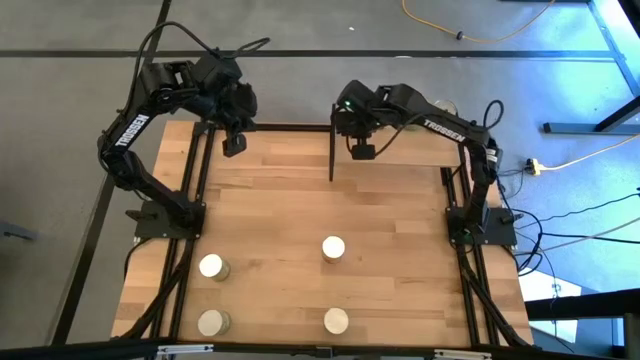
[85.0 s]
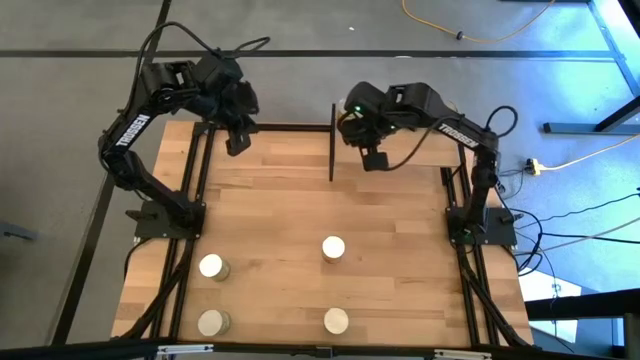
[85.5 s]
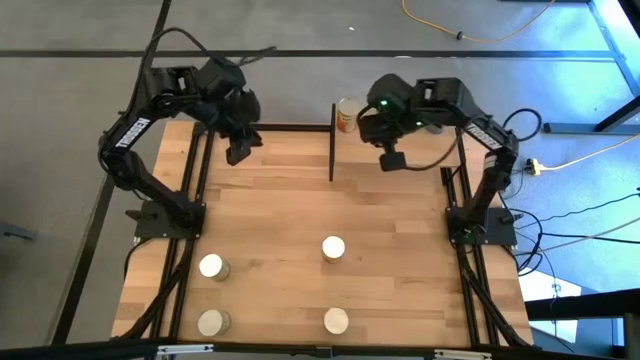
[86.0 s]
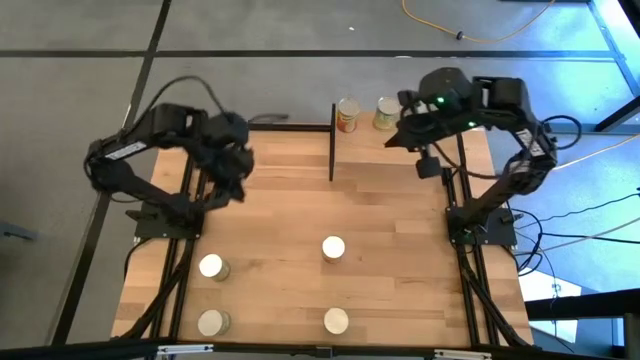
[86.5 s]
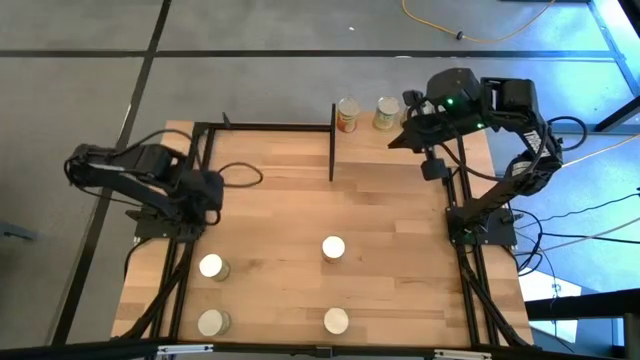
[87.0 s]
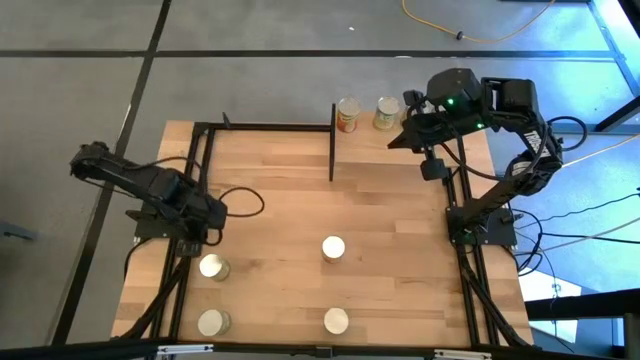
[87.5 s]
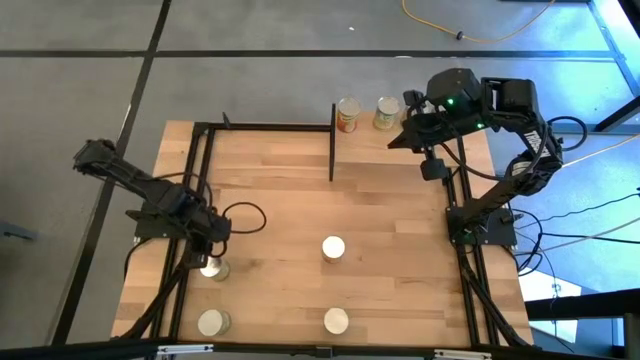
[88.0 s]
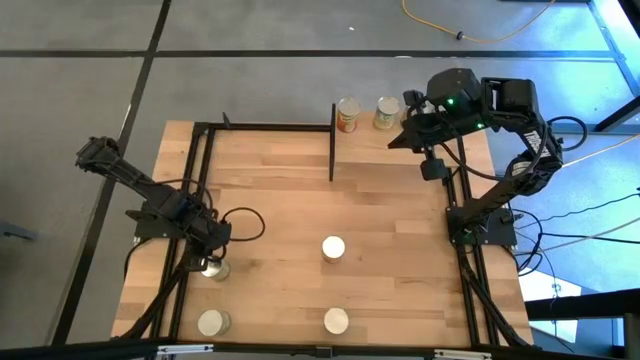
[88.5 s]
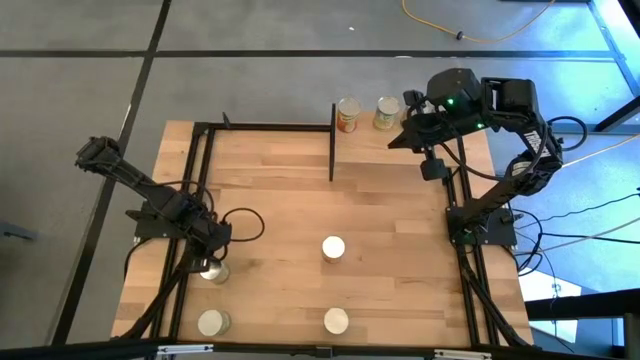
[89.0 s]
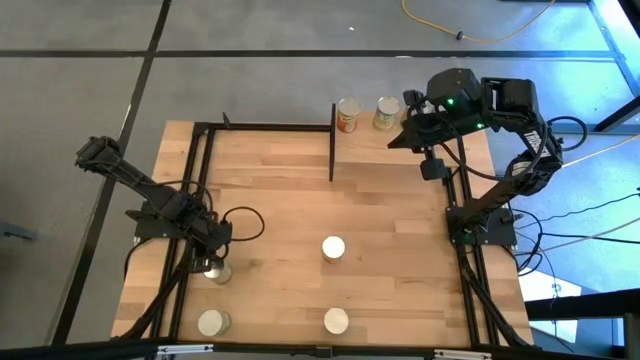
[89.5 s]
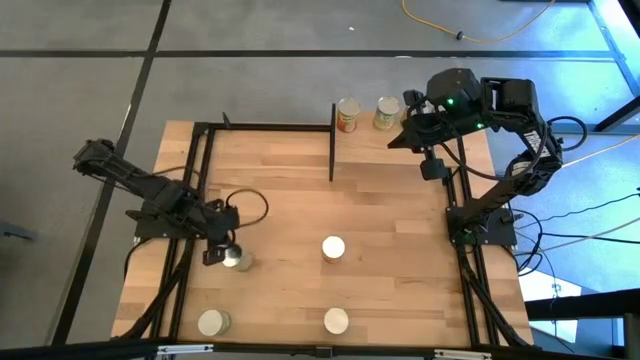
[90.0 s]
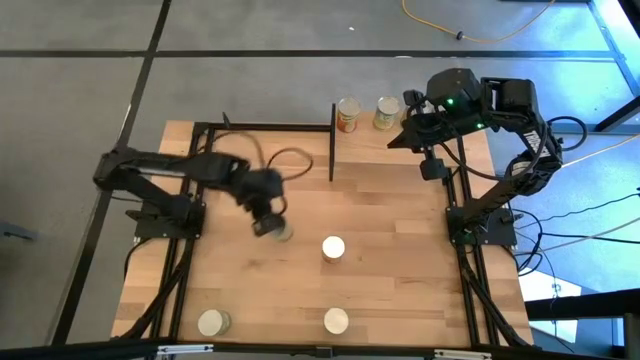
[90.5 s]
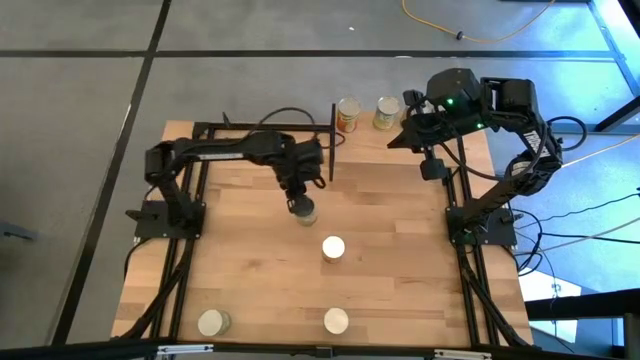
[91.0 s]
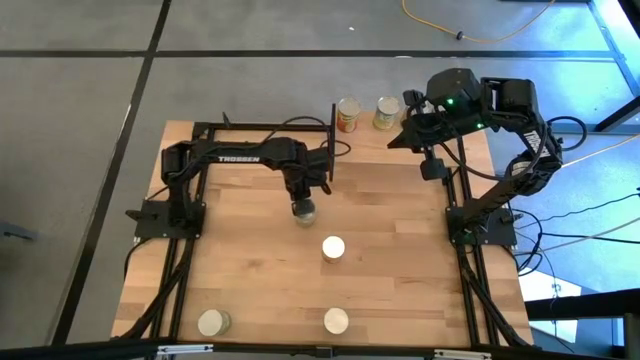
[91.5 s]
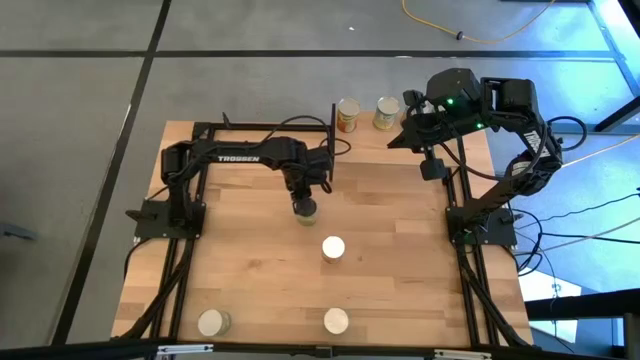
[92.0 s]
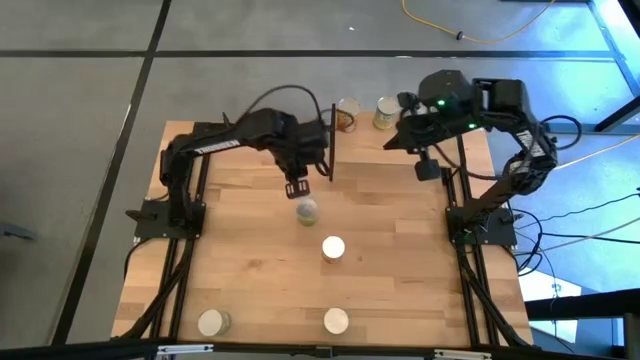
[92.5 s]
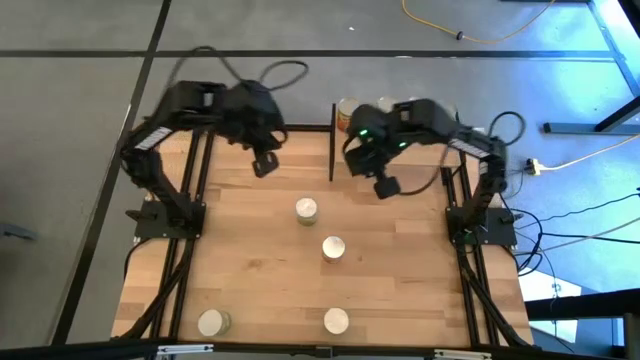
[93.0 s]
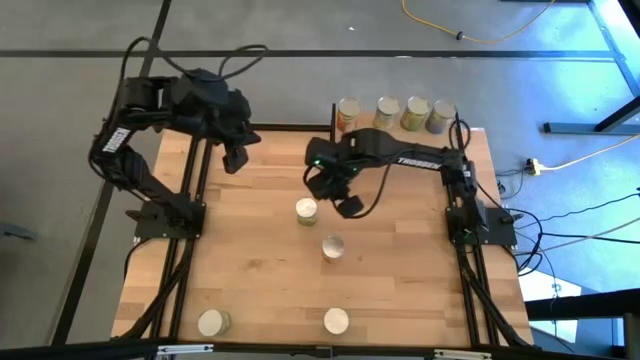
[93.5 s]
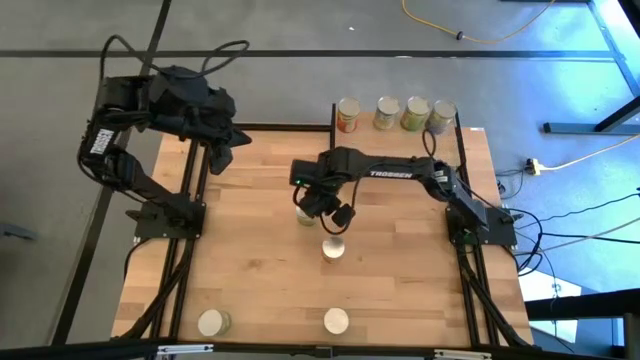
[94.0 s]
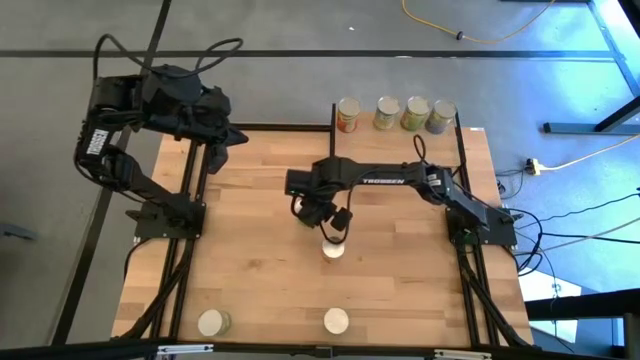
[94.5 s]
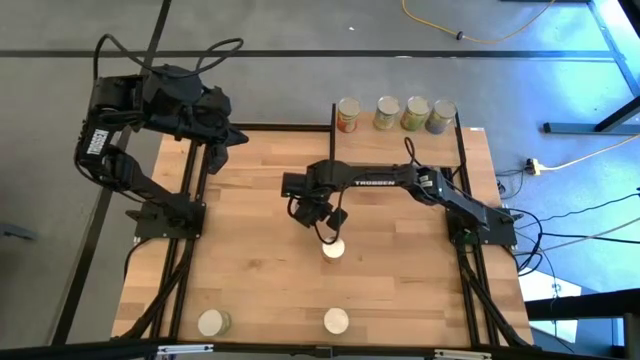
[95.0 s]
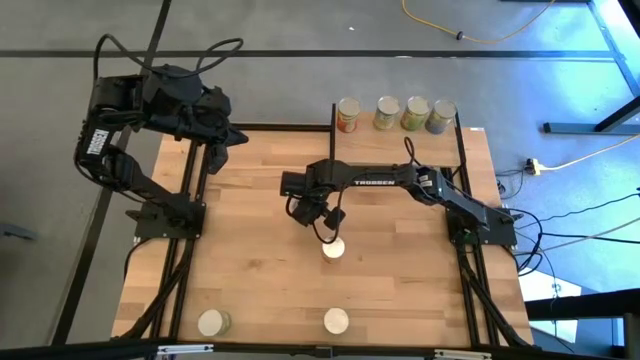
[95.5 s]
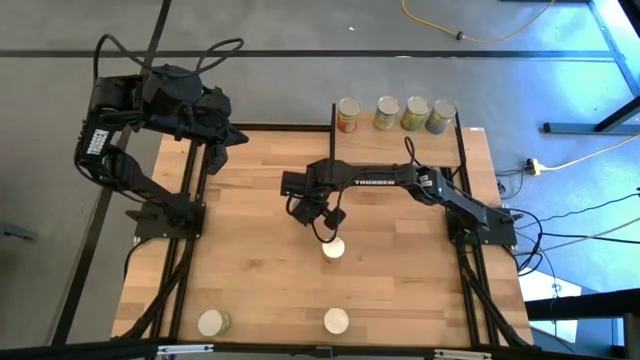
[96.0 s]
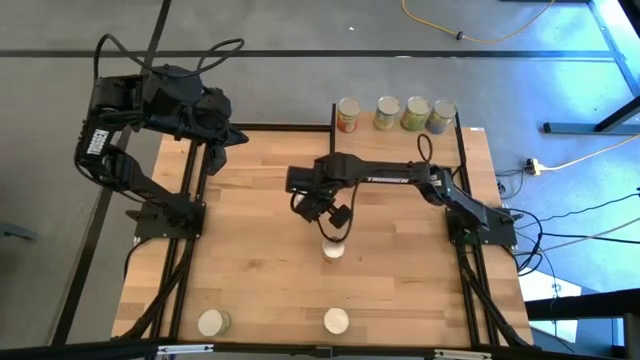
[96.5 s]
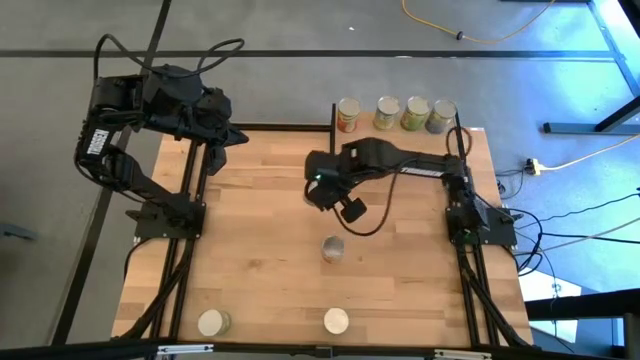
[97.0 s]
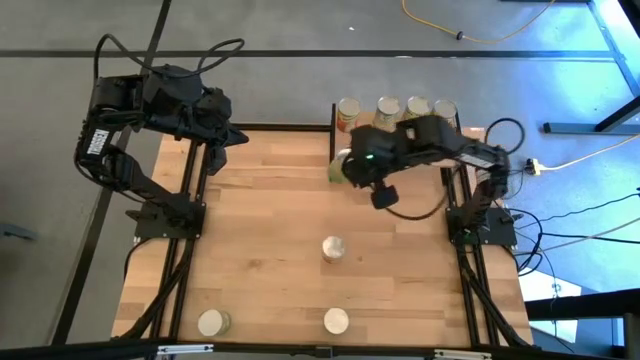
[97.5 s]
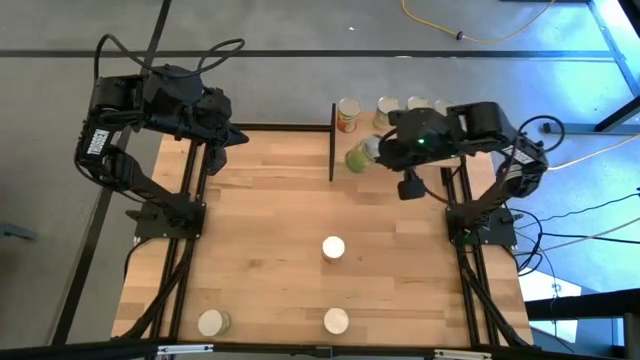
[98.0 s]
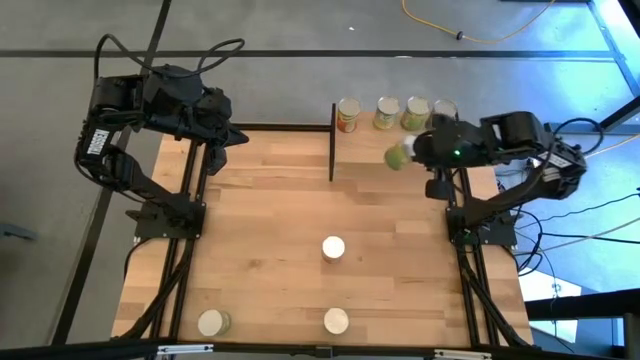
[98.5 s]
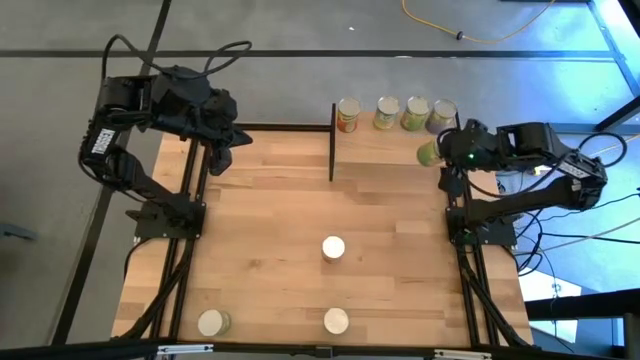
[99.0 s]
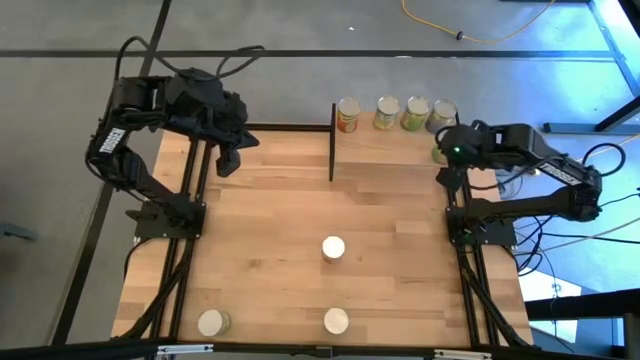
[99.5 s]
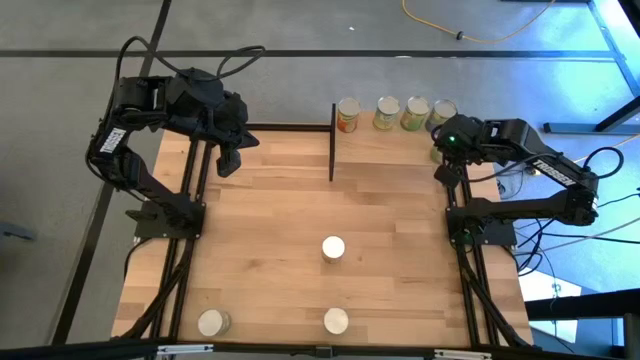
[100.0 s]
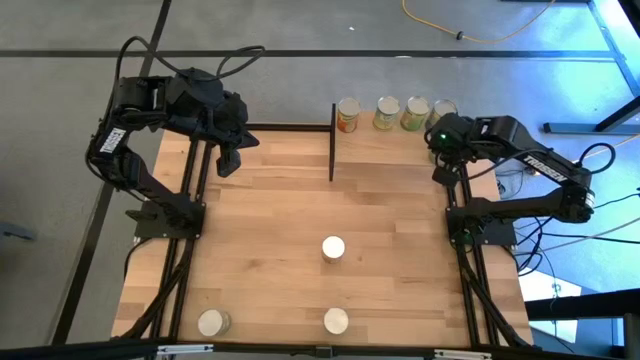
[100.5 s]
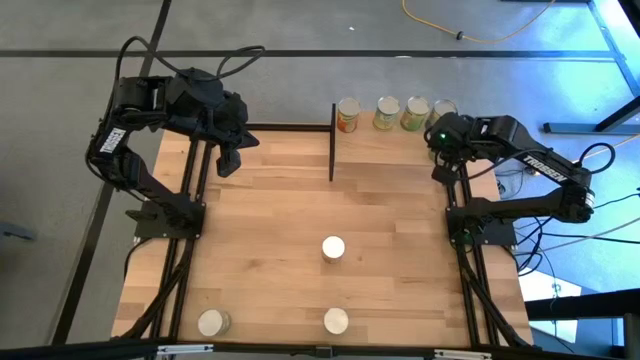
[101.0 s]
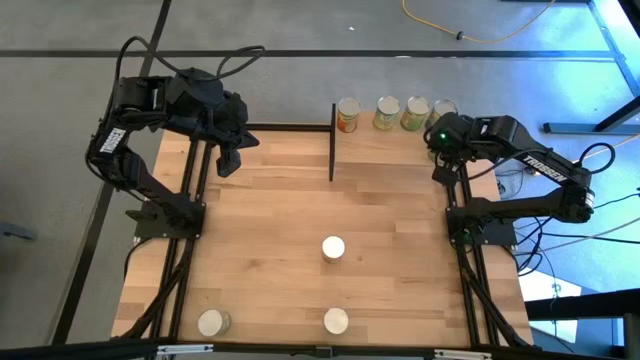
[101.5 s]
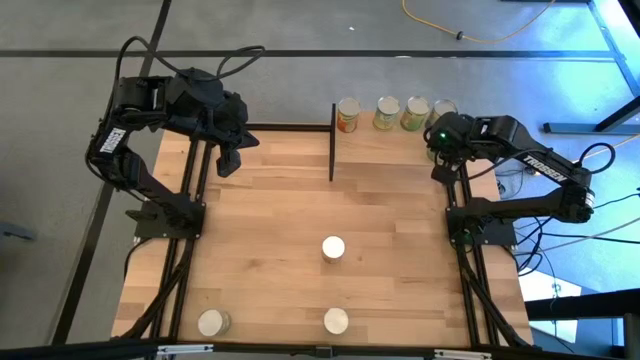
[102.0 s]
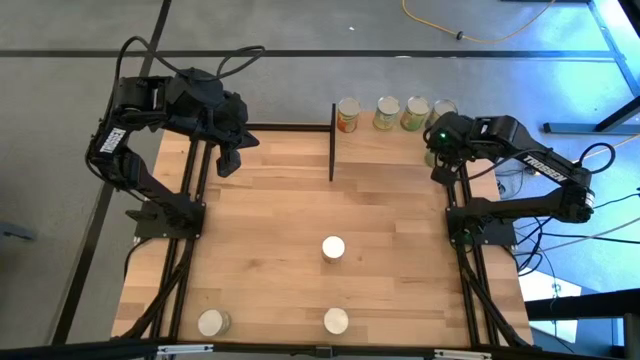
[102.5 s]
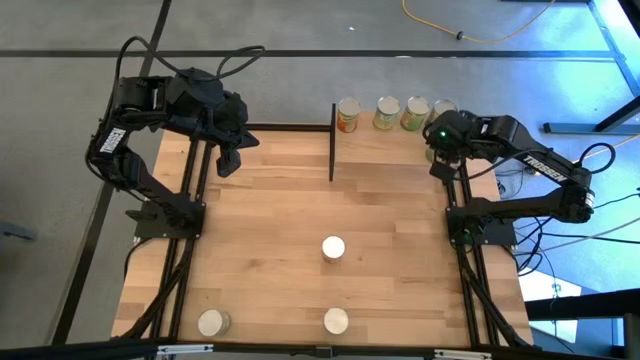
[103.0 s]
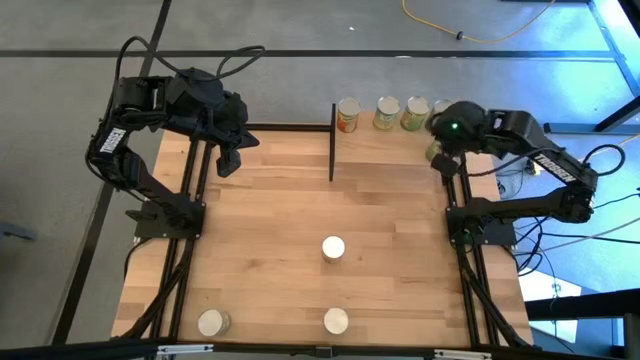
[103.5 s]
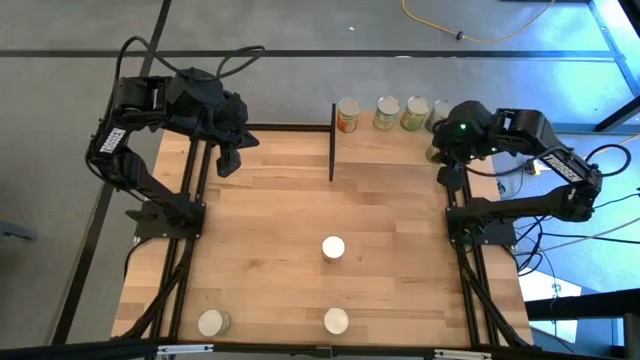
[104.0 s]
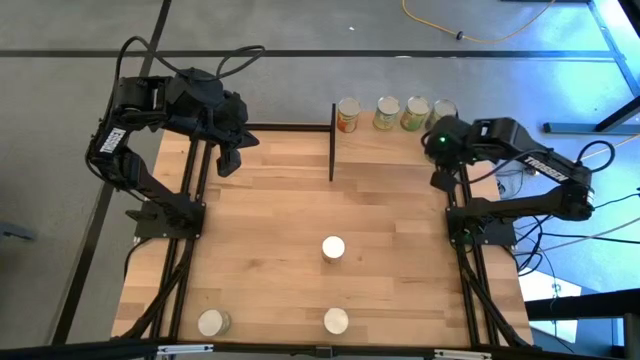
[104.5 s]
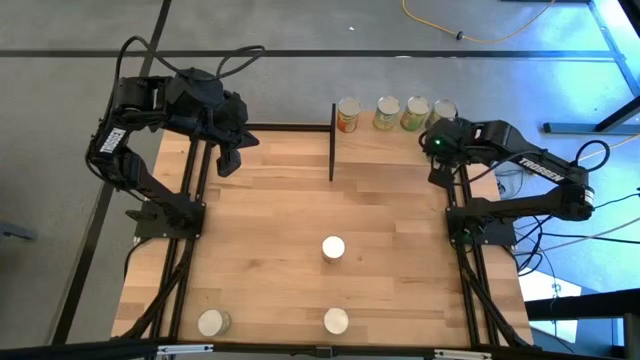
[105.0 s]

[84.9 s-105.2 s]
Task: Pick and place cans onto a shelf
Put the canned orange on the shelf
